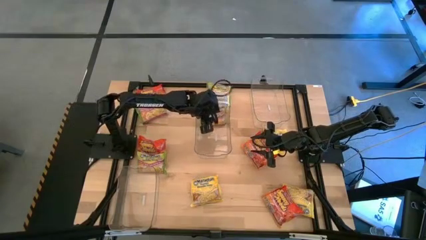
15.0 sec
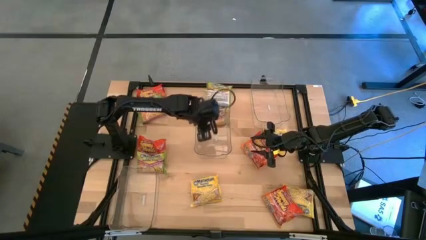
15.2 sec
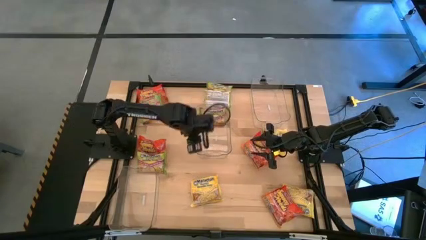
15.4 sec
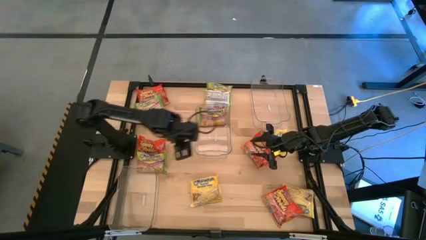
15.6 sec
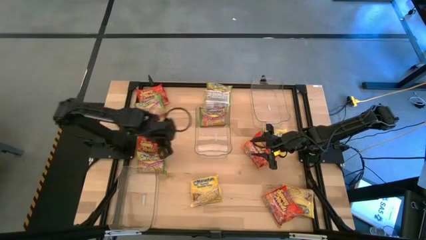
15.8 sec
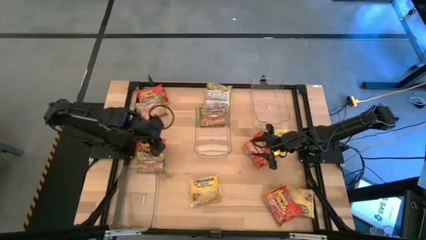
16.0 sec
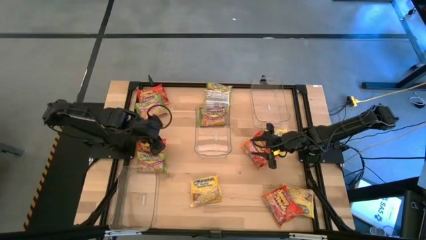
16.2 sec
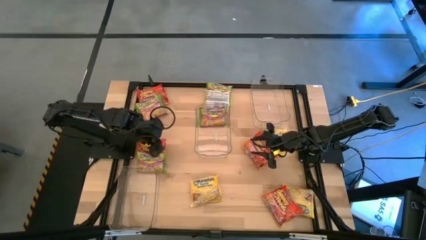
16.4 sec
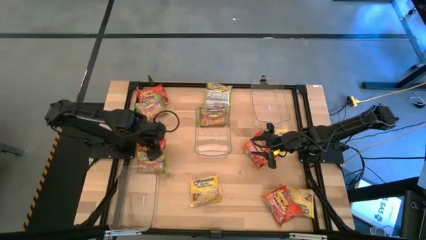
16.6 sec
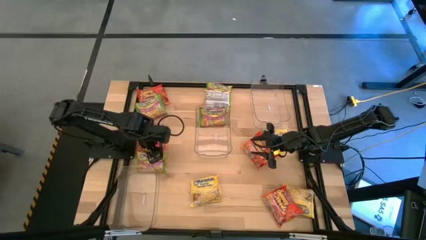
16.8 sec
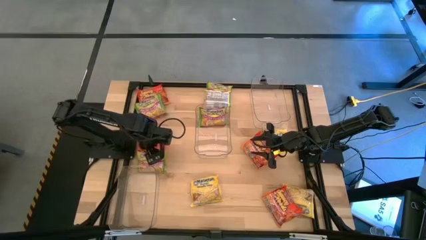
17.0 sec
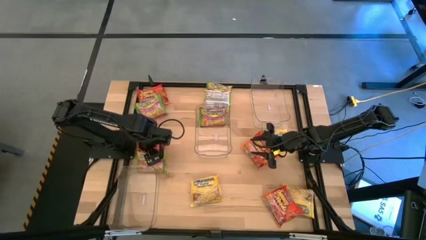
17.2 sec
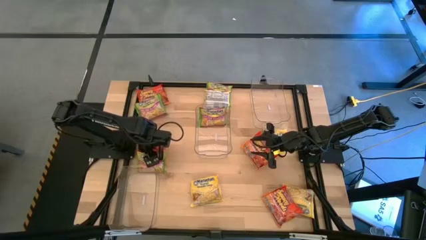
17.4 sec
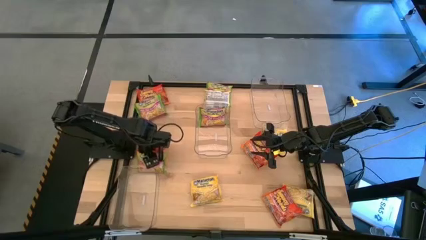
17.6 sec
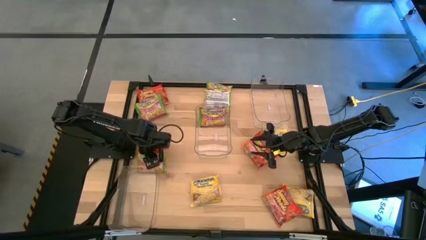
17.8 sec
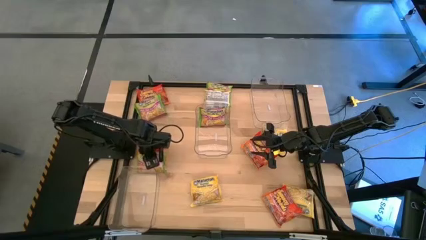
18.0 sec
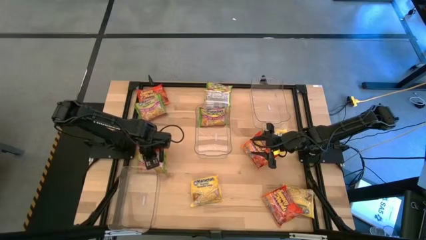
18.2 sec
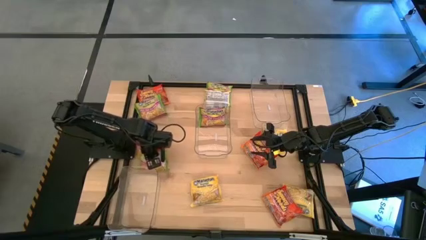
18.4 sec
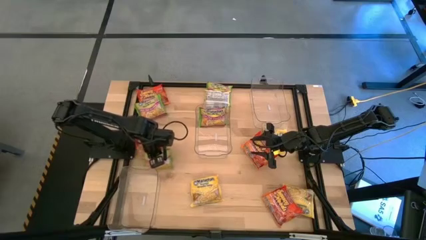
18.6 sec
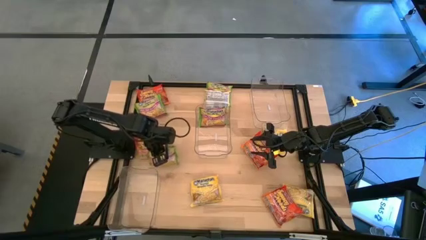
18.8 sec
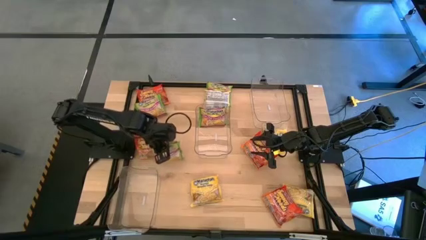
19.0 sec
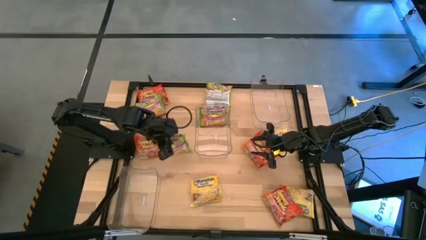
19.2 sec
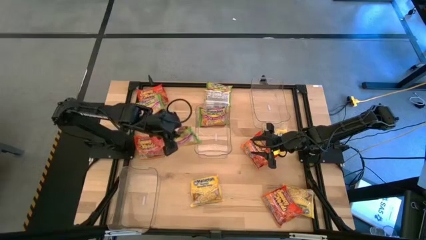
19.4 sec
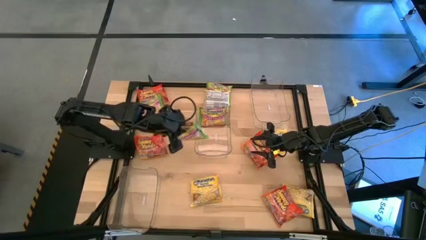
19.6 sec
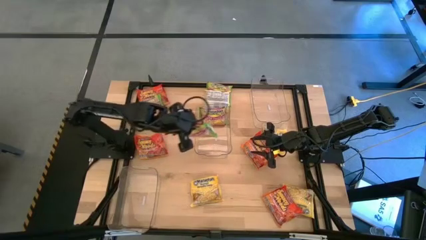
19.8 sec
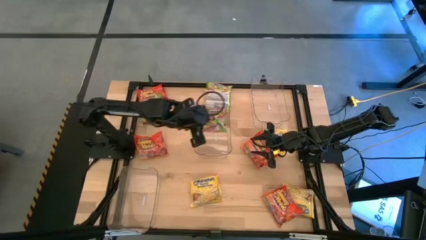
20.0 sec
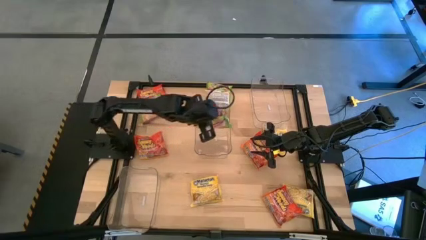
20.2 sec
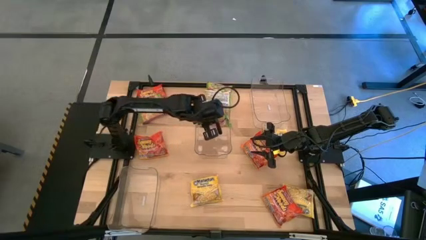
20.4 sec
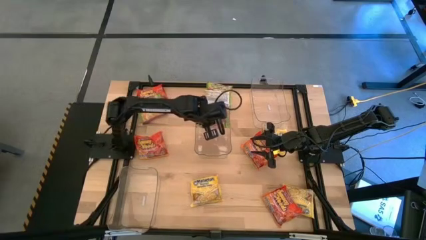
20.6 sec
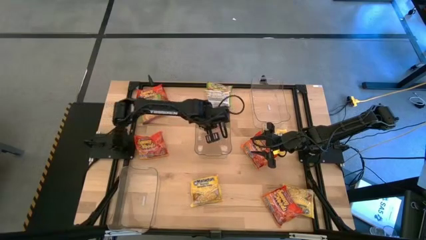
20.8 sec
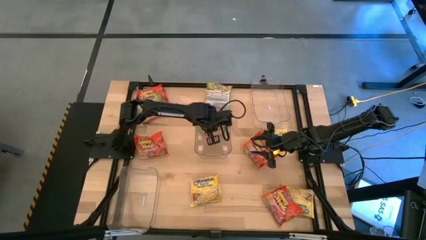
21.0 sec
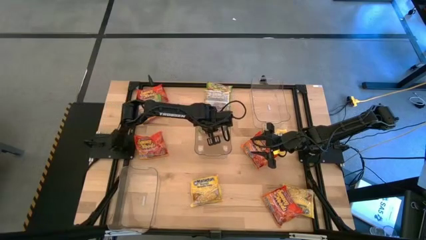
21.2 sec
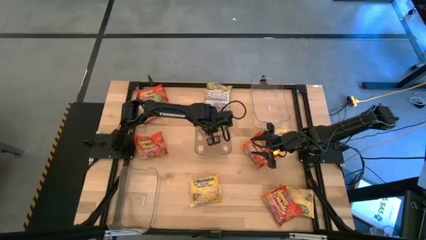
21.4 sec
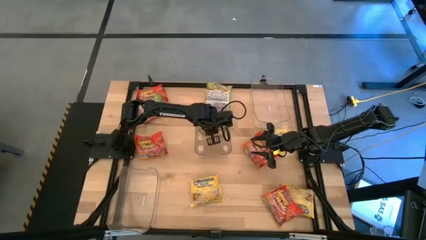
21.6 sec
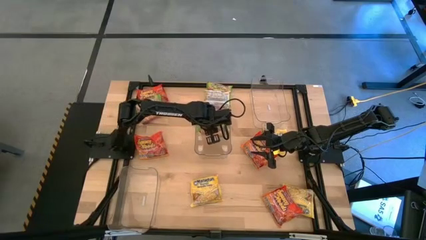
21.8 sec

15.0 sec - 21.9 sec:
Task: Sort Maruchan noodles
Put the bottom green noodle pack into the middle transparent bin

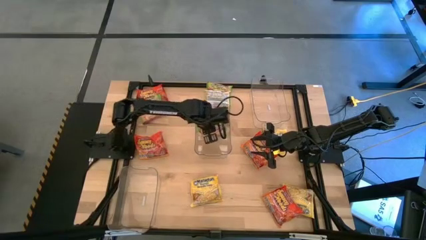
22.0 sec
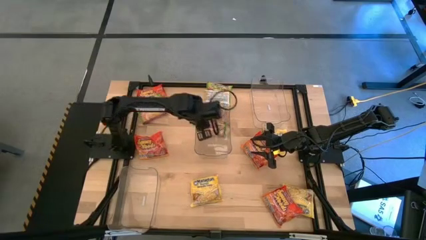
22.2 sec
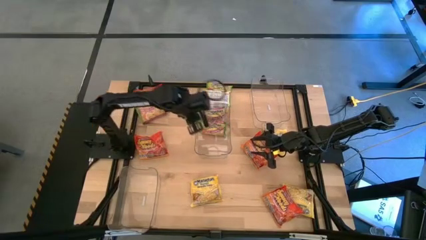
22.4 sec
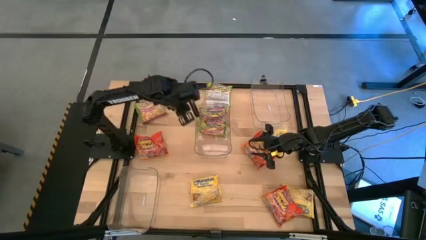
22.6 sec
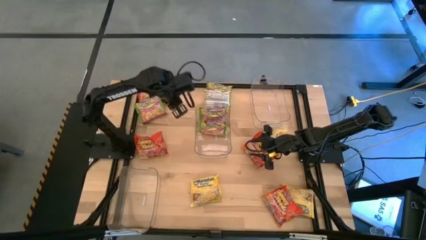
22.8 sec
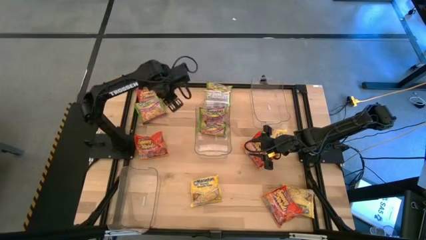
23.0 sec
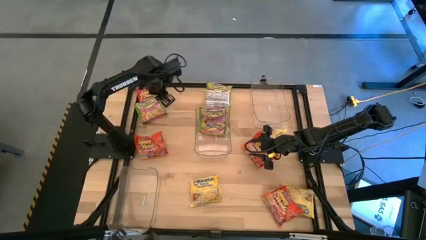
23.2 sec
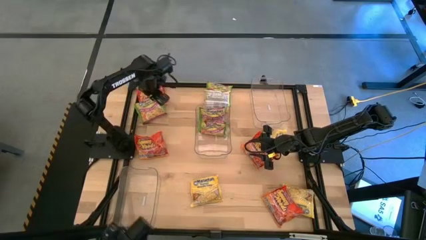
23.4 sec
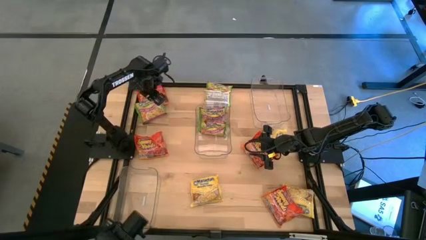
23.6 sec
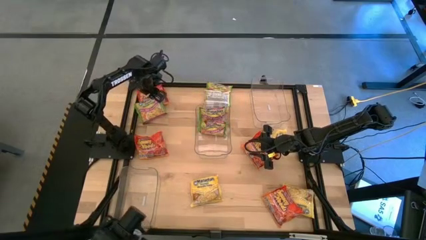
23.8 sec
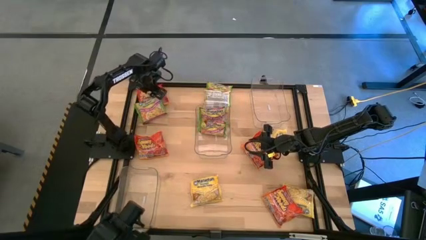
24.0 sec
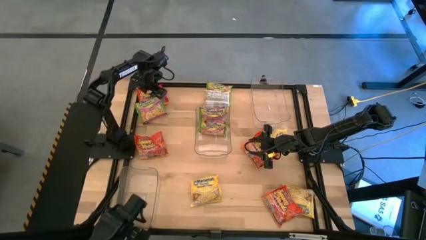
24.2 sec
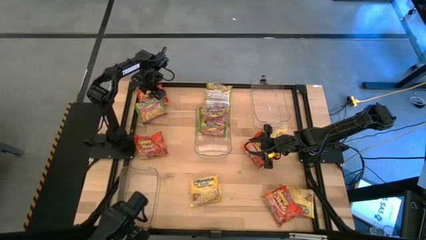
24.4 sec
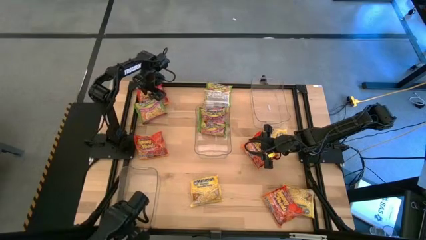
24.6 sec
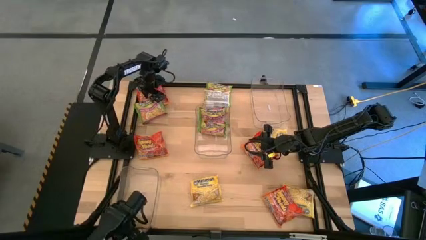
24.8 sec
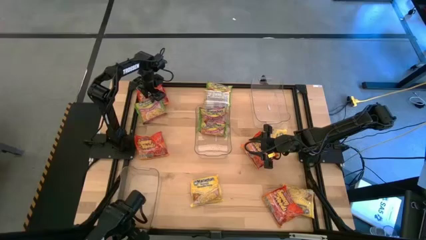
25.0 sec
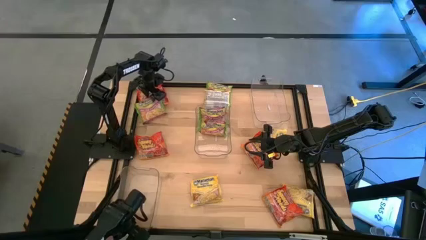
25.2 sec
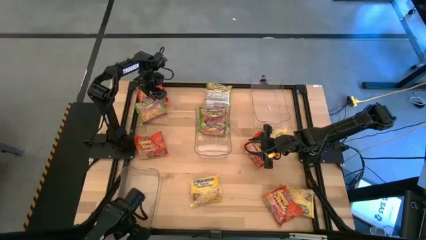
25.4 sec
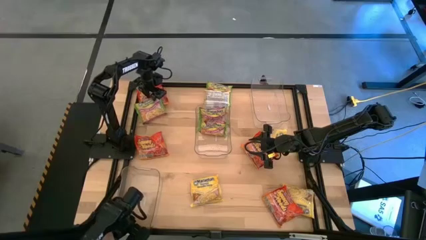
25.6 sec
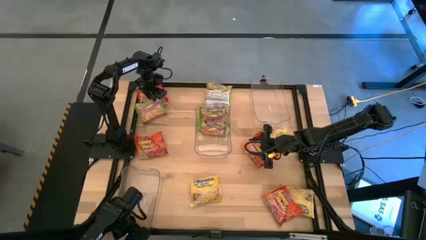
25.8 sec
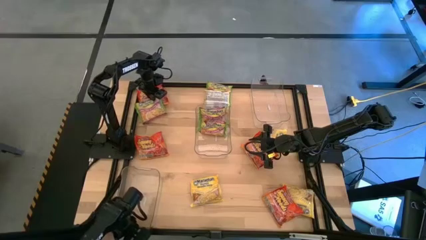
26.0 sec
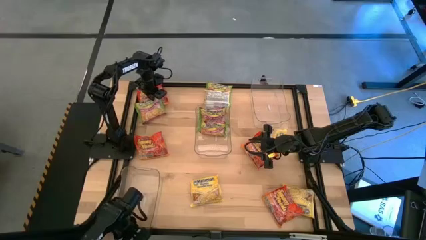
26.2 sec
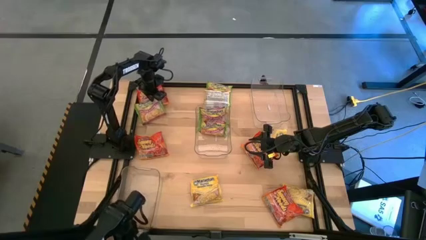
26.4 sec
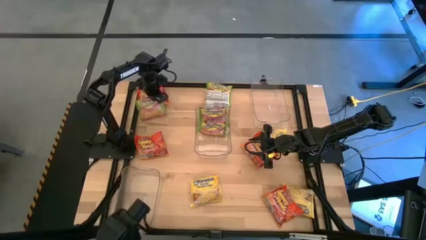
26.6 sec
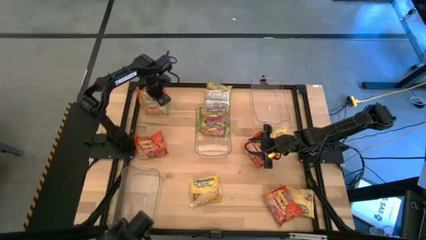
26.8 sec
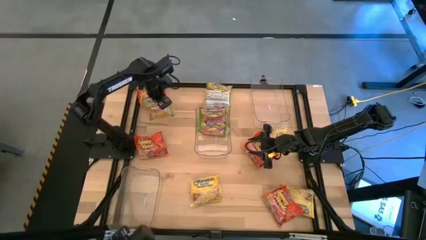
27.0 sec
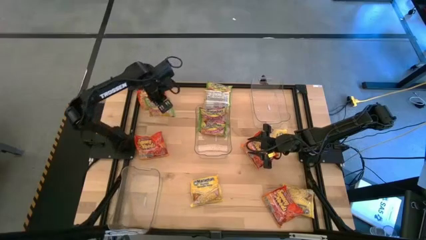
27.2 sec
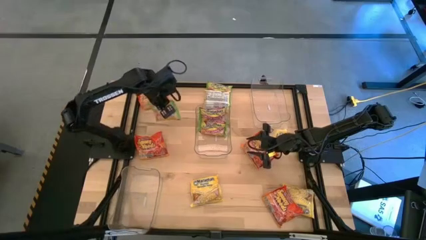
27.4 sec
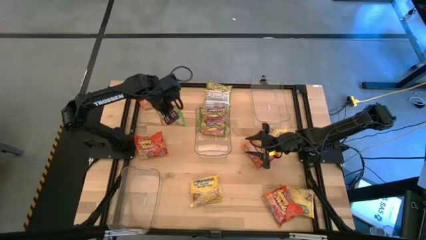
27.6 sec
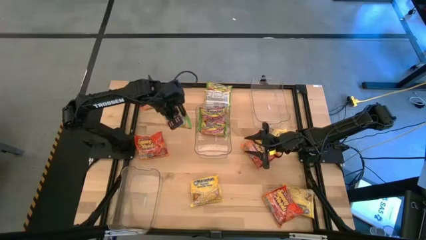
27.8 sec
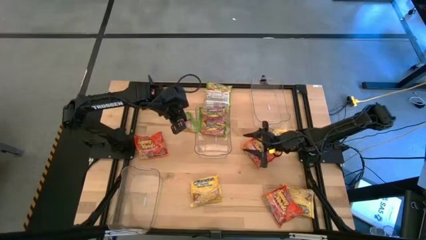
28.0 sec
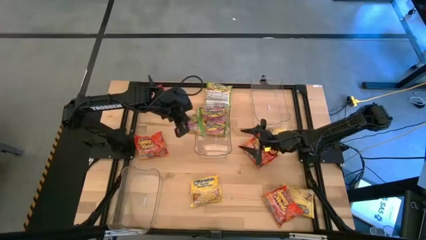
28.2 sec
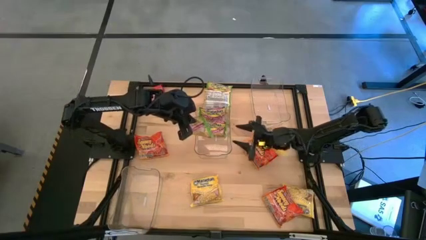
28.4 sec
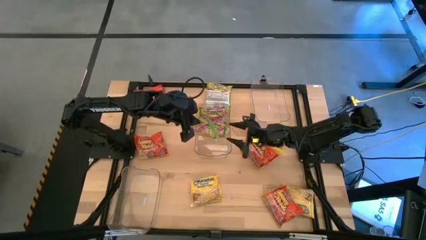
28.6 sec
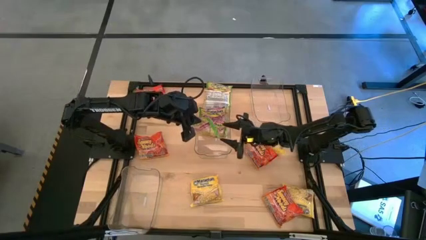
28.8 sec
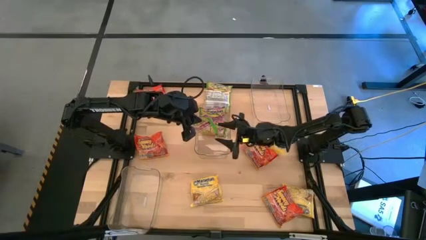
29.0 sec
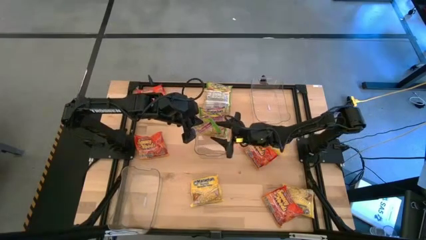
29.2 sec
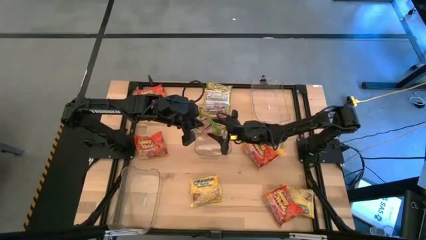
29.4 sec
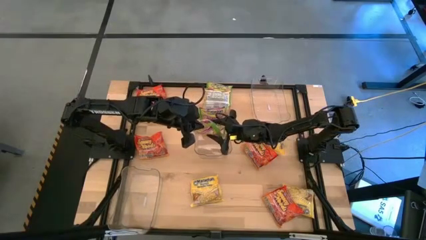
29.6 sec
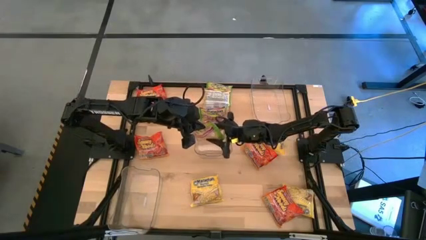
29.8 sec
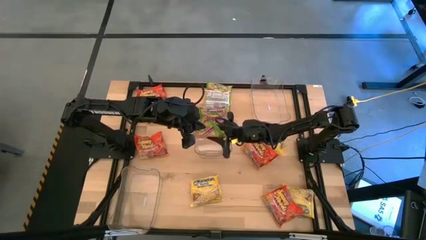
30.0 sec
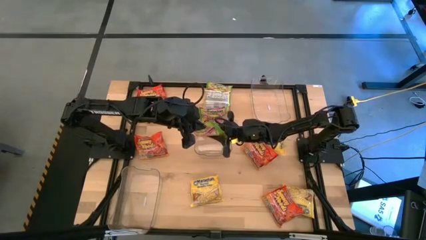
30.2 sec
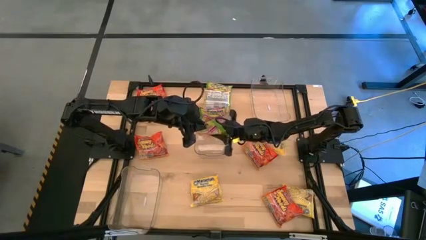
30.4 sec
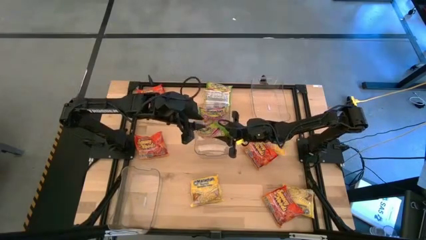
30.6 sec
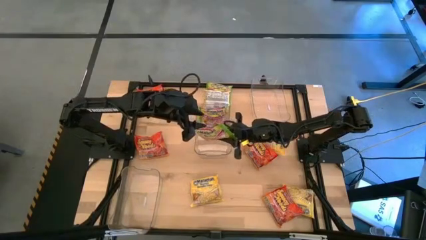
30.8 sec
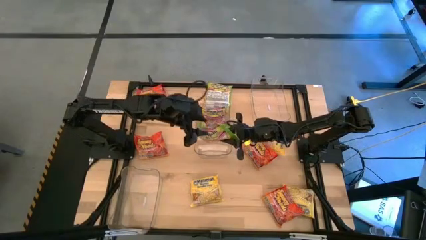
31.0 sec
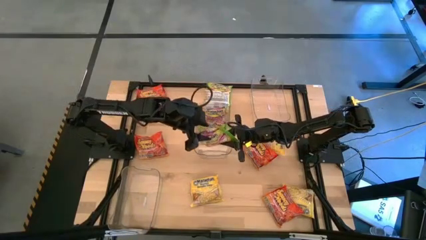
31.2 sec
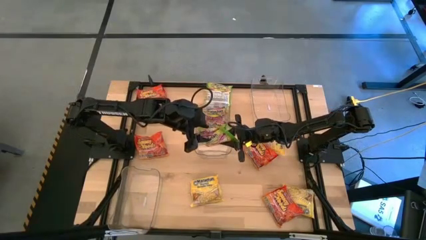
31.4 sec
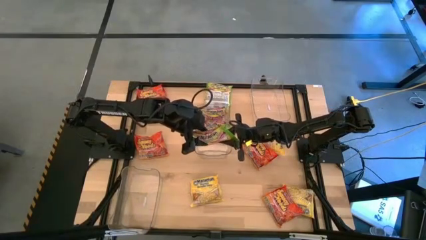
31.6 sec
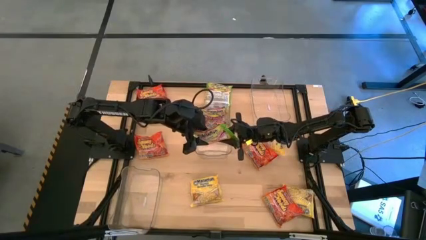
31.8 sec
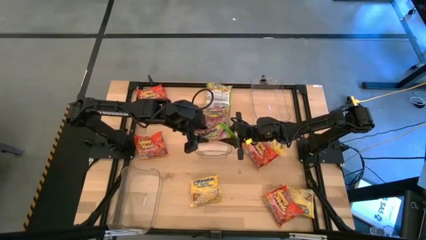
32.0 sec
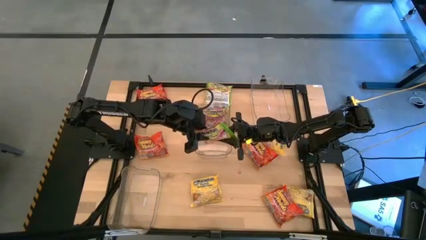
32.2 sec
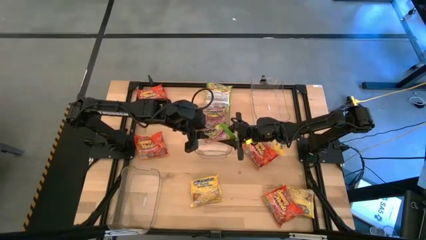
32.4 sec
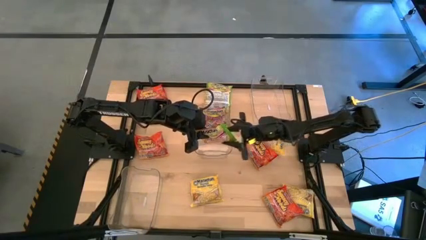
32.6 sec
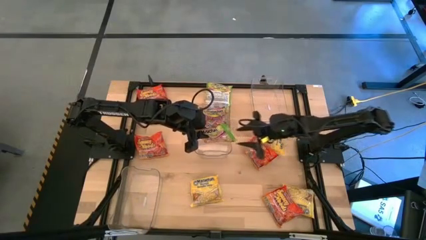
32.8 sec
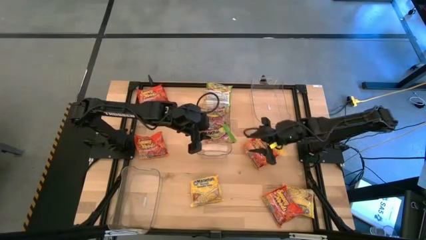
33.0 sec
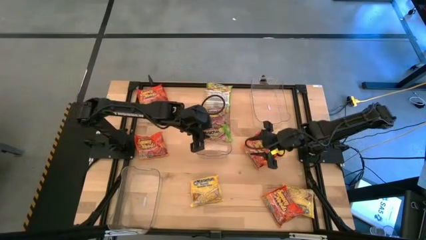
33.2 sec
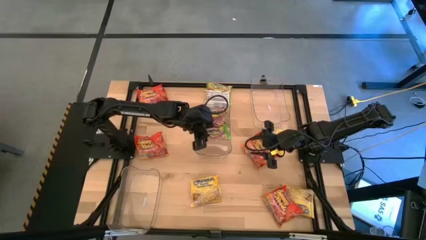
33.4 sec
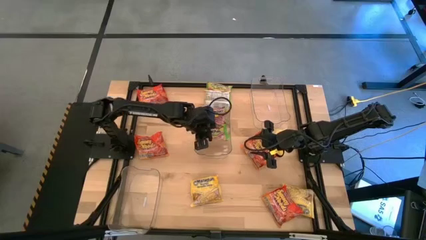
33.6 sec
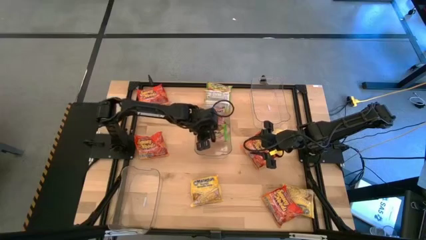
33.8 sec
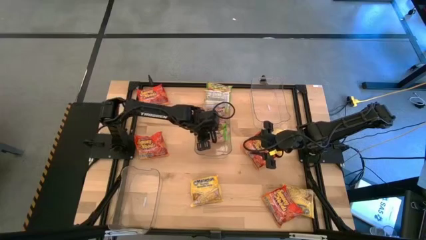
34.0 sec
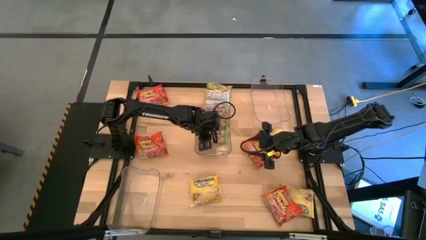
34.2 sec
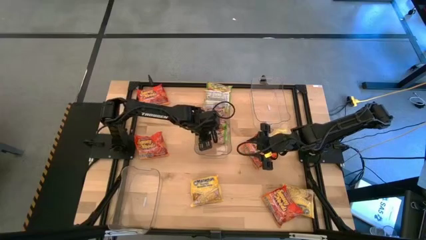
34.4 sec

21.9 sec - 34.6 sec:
Put the left green noodle pack into the middle transparent bin
